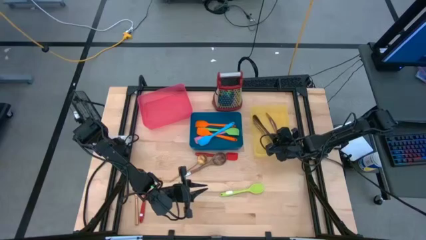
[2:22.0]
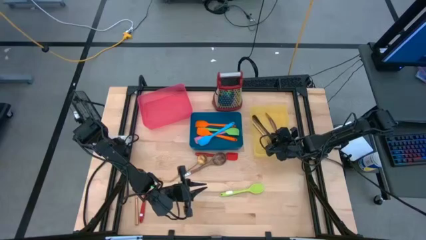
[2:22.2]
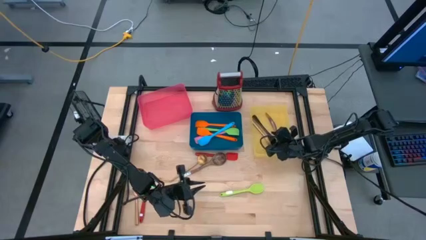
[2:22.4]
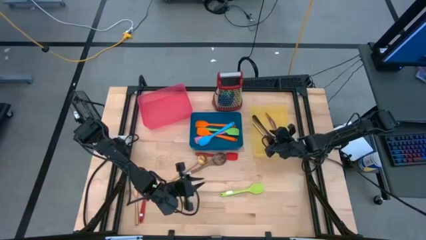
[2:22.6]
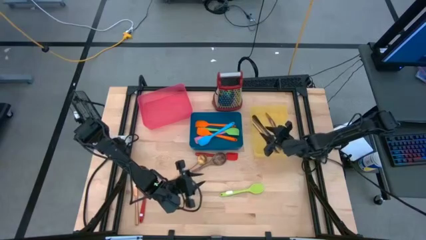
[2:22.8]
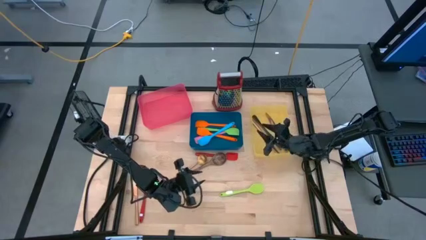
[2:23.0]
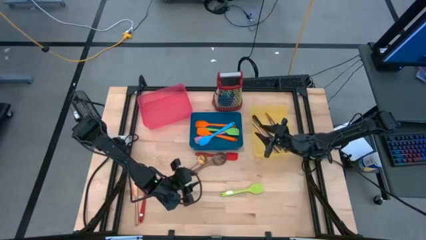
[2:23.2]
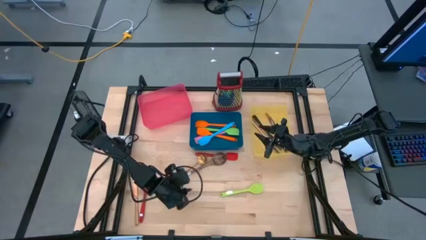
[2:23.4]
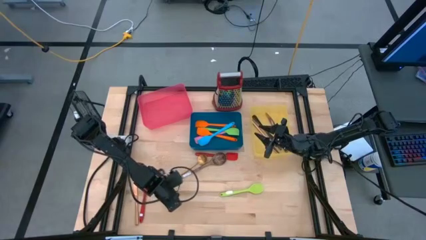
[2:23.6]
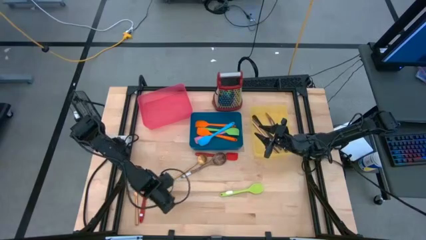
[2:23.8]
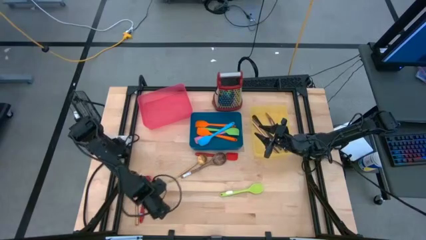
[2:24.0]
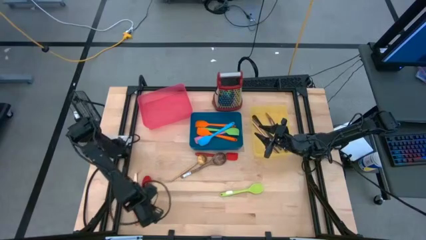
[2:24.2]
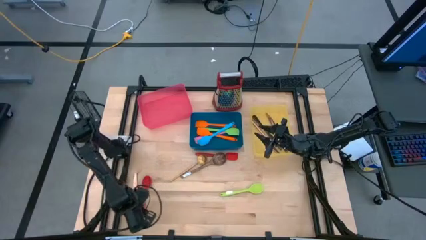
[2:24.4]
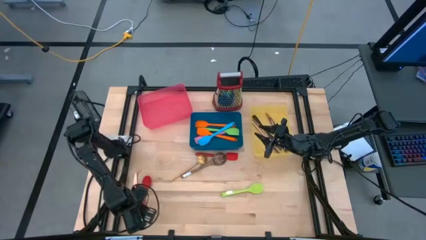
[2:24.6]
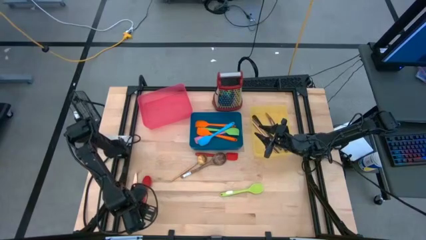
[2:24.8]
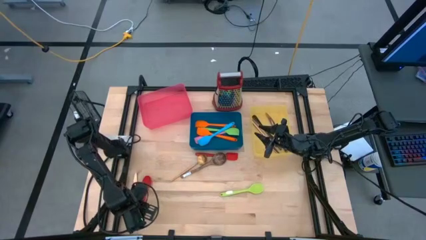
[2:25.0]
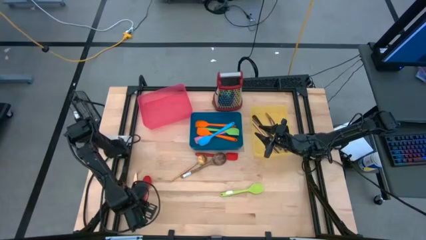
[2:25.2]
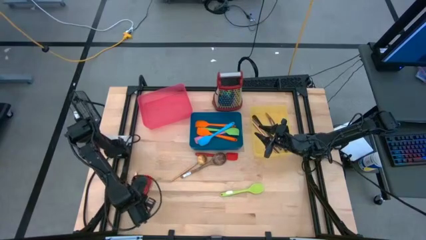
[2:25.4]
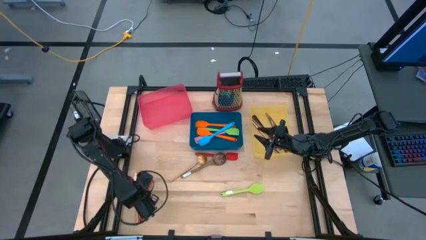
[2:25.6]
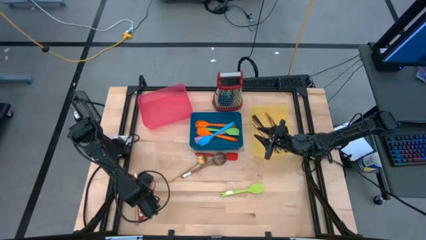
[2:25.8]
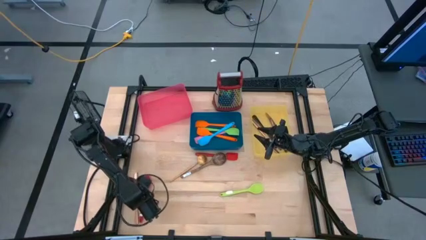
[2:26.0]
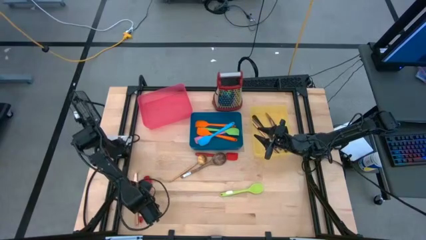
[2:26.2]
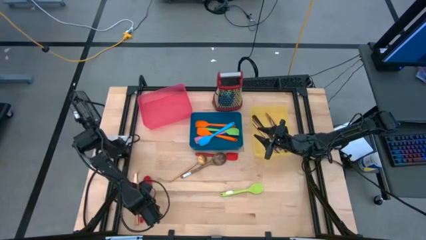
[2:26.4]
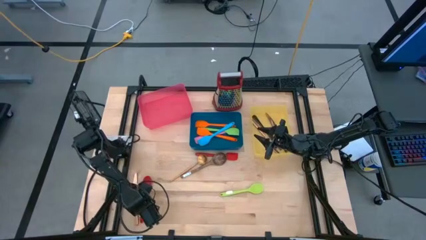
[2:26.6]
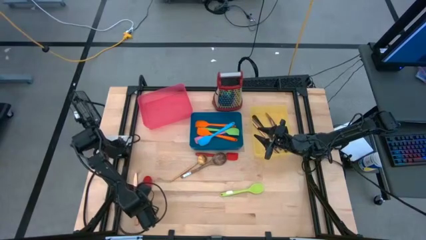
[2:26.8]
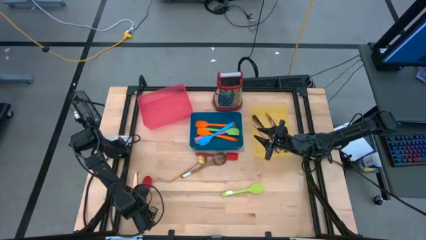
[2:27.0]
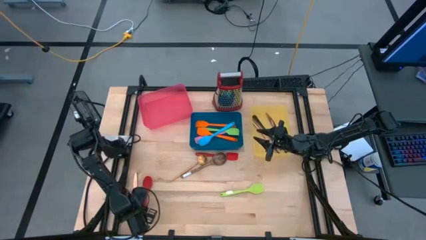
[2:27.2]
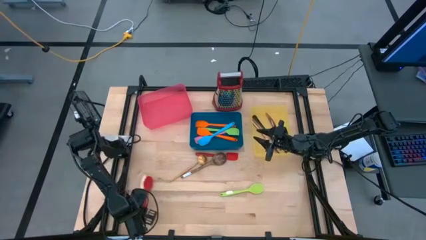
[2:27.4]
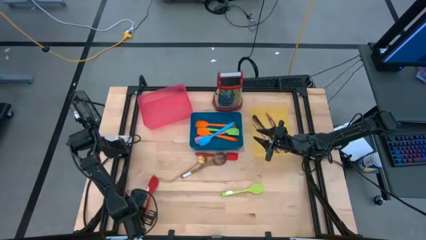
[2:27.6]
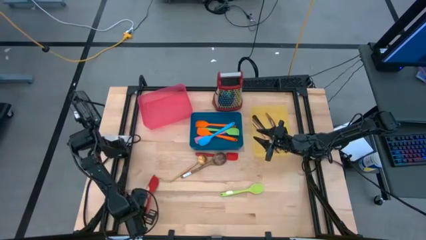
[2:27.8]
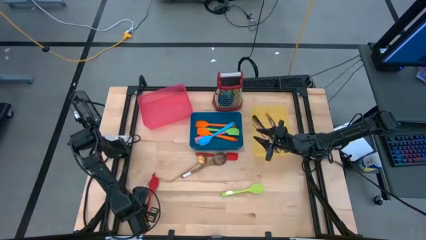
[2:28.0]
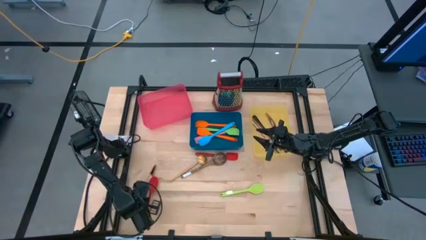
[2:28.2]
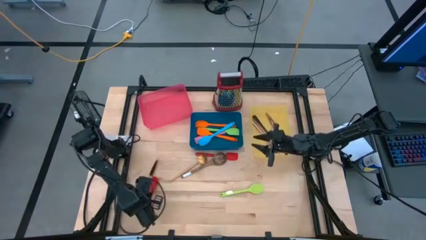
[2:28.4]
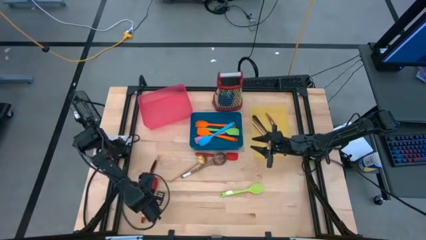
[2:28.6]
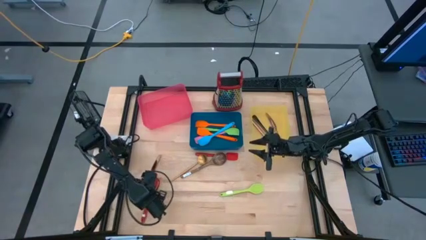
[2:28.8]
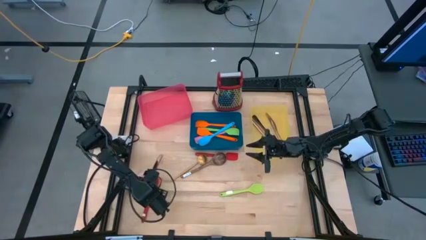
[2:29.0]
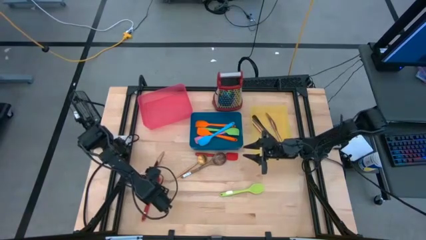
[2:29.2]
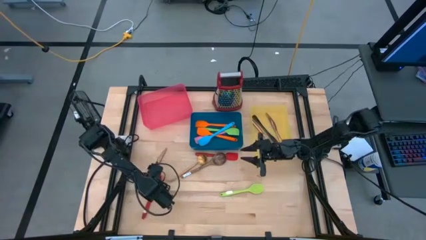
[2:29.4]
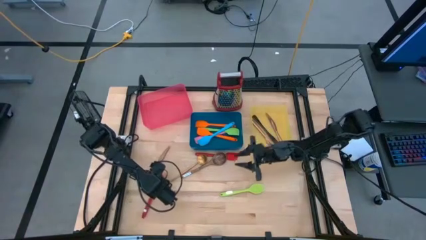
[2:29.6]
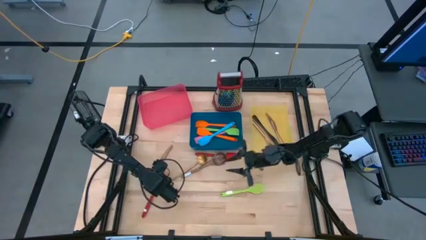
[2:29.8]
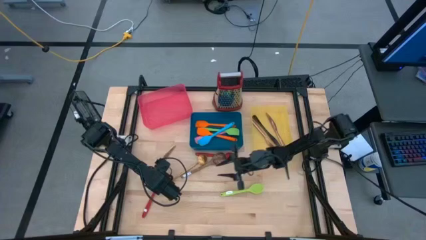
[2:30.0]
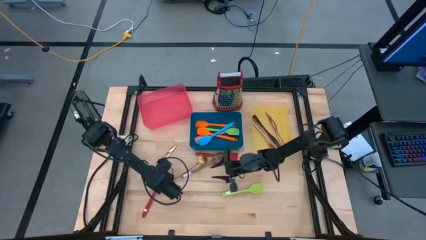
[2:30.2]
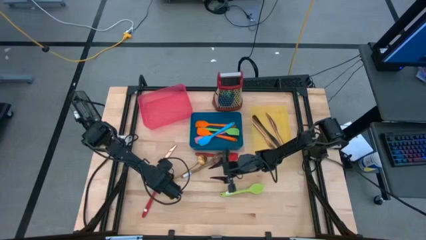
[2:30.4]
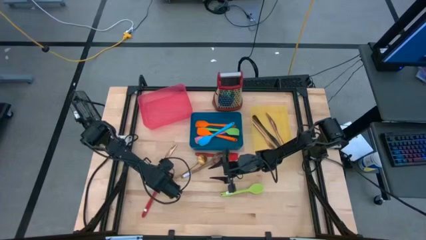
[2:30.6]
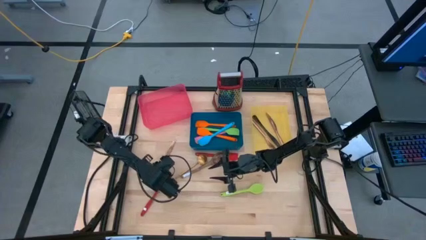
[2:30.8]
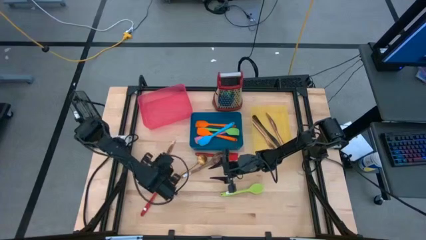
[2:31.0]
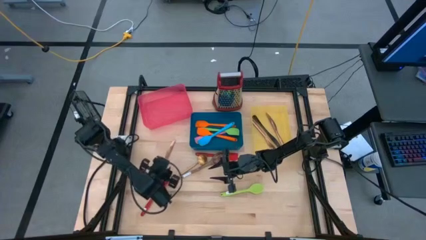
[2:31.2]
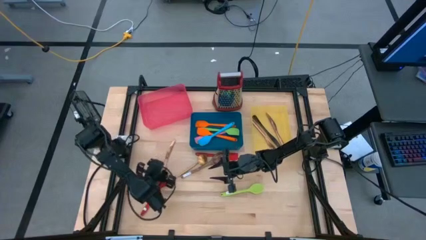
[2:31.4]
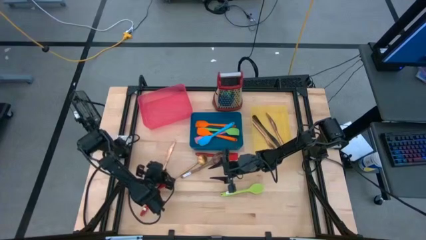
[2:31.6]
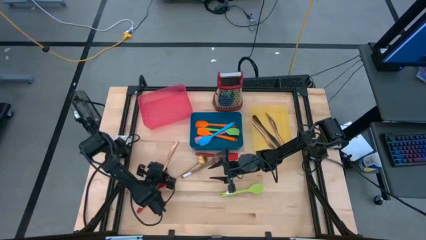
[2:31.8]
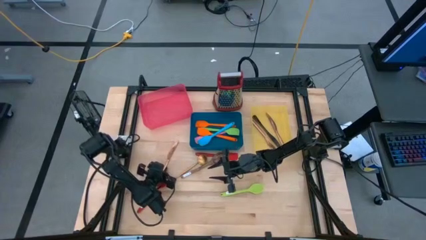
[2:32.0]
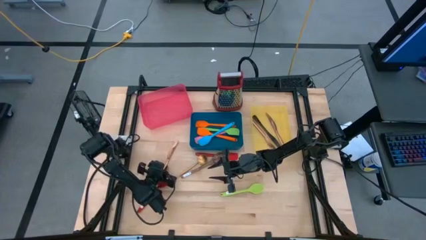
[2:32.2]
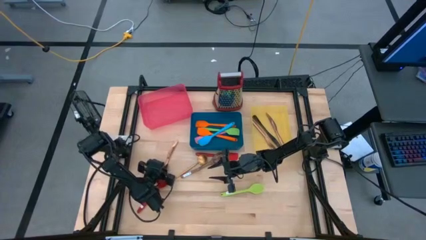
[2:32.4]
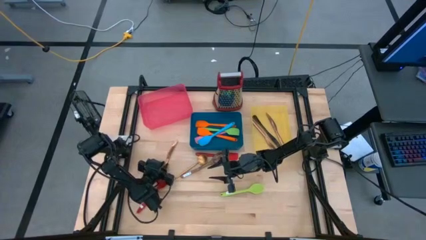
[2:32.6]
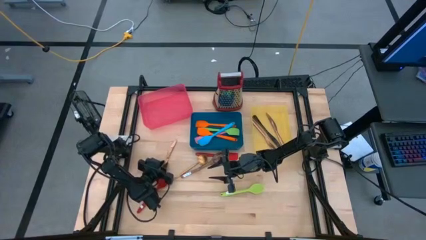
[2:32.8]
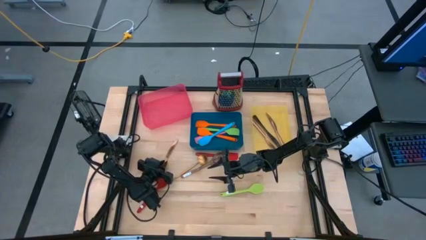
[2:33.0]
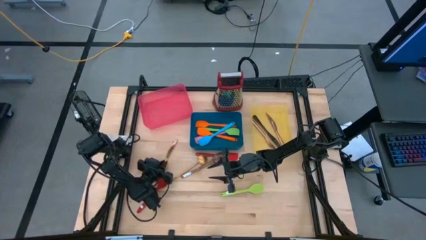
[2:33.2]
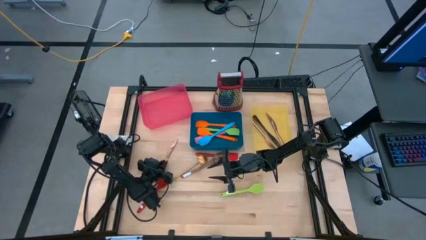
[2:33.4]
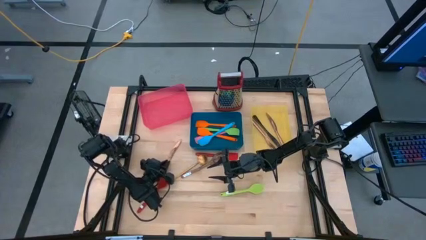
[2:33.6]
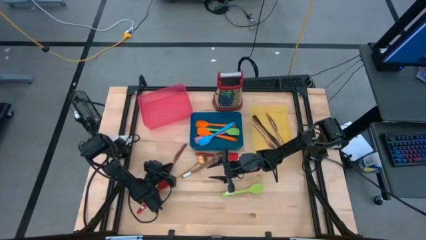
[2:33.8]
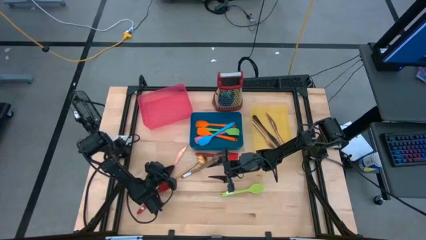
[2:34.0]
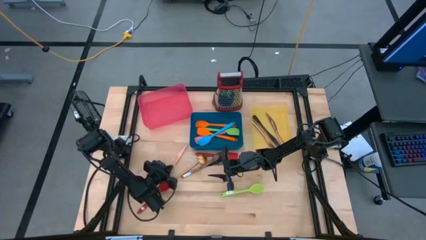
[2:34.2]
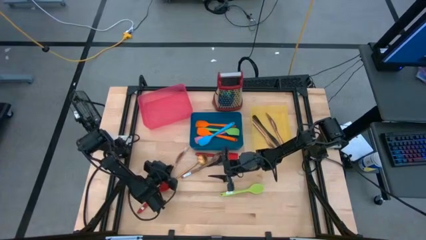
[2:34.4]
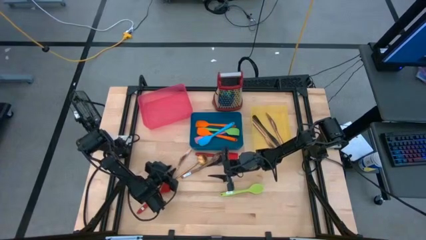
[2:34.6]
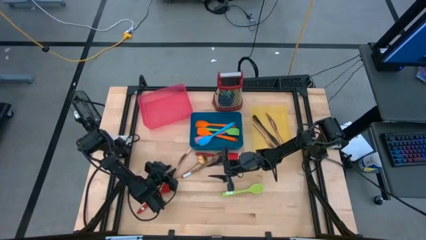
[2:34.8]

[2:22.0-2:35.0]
Task: Pick & Place Kitchen Items
Put the gold table knife into the yellow bin
